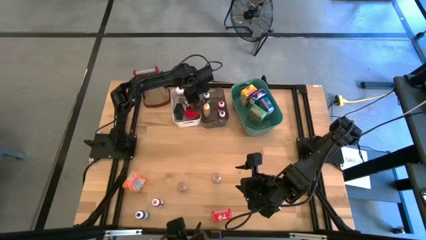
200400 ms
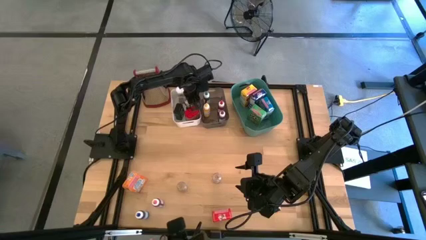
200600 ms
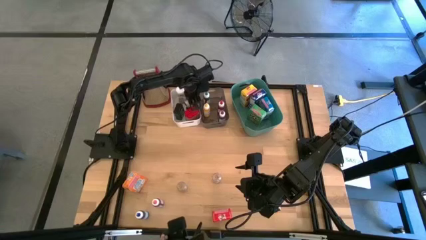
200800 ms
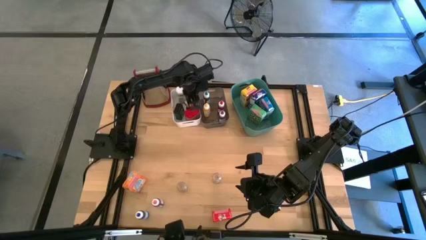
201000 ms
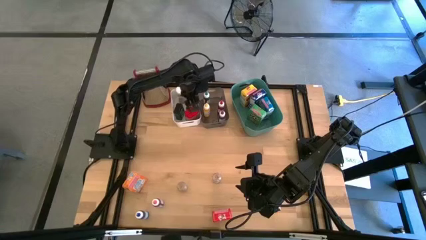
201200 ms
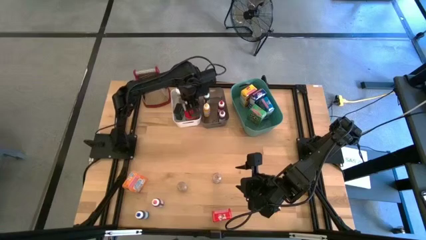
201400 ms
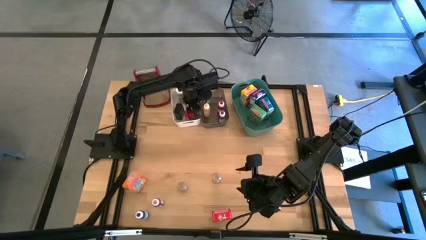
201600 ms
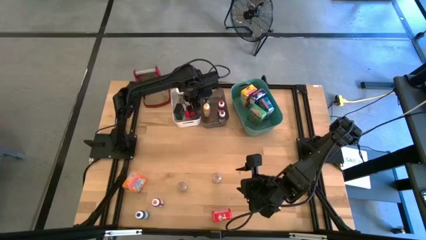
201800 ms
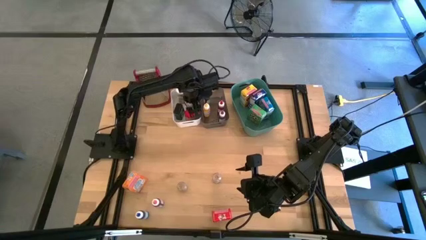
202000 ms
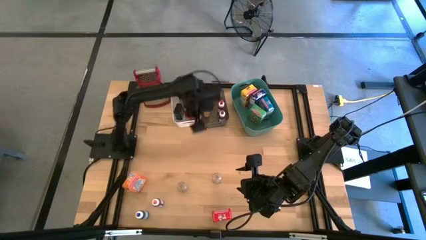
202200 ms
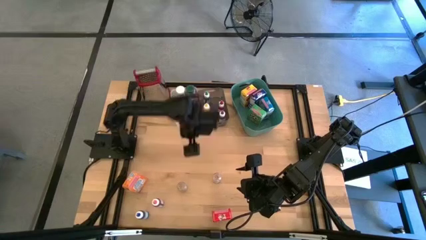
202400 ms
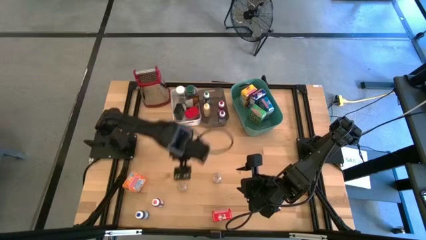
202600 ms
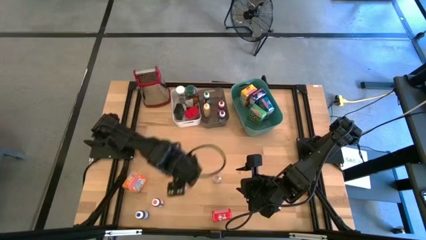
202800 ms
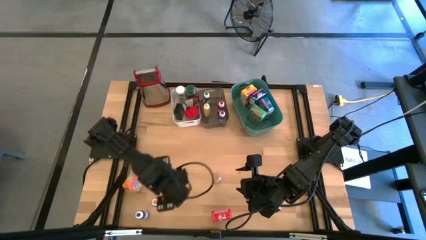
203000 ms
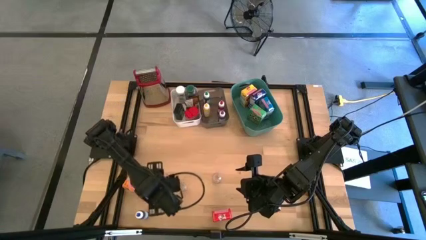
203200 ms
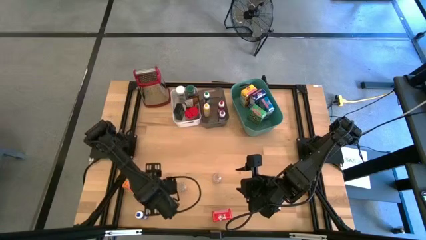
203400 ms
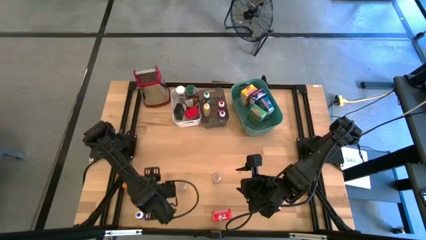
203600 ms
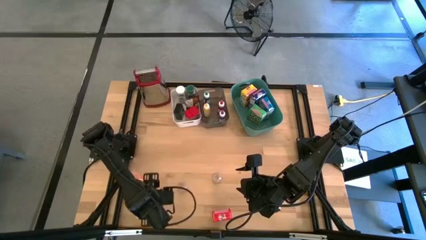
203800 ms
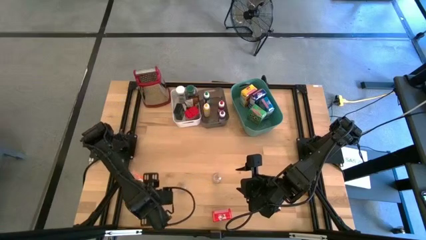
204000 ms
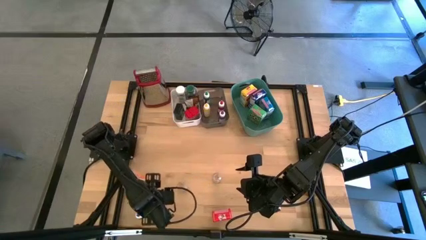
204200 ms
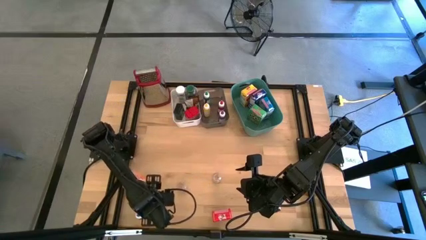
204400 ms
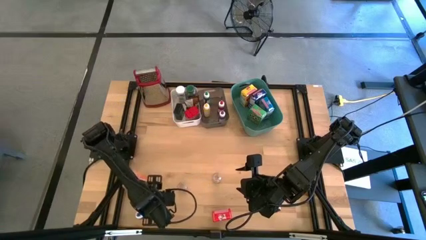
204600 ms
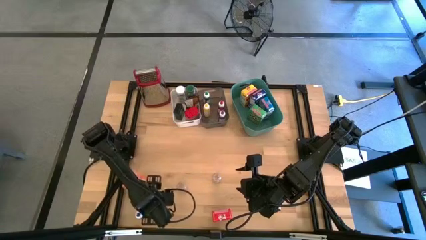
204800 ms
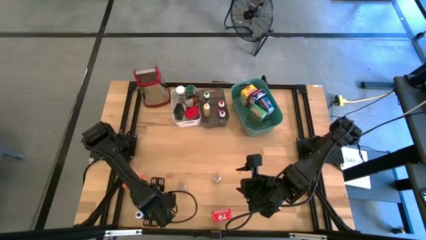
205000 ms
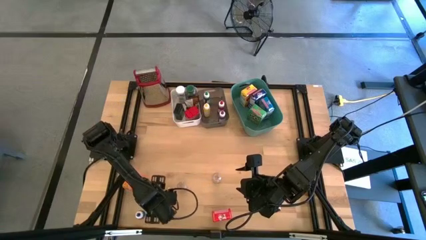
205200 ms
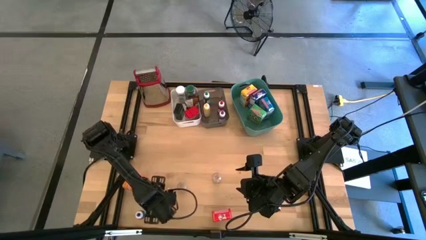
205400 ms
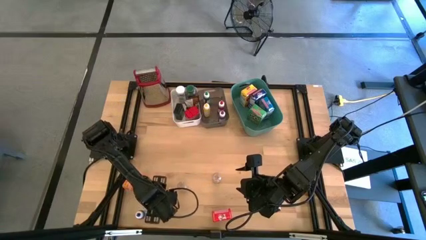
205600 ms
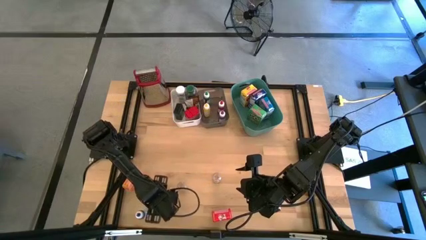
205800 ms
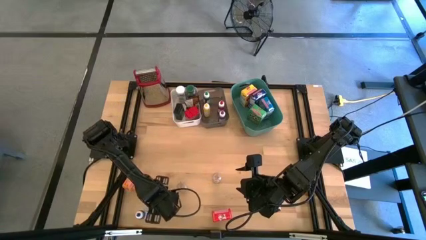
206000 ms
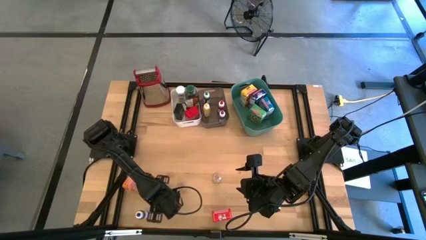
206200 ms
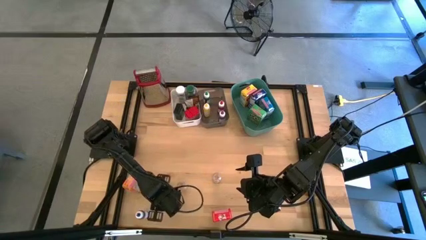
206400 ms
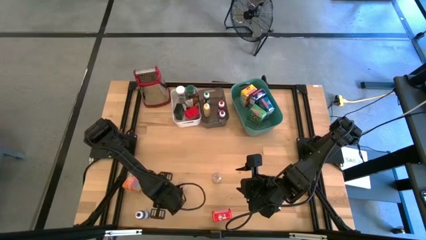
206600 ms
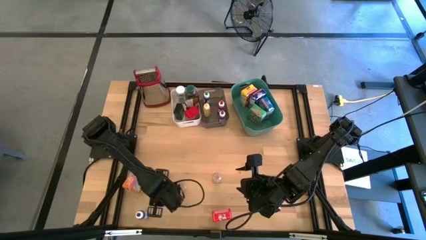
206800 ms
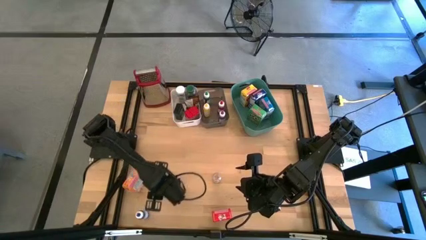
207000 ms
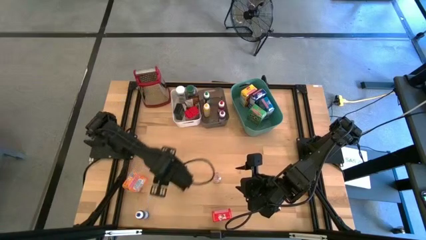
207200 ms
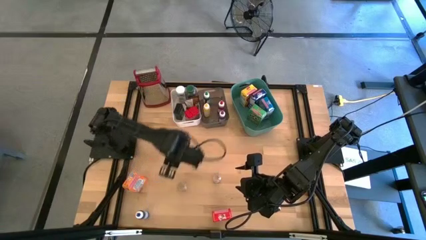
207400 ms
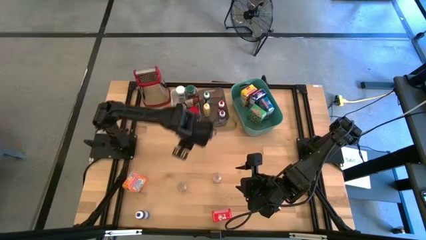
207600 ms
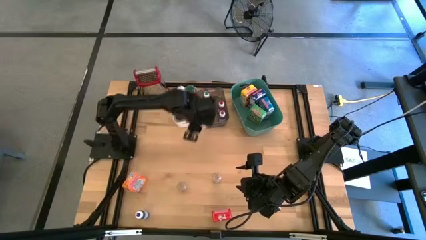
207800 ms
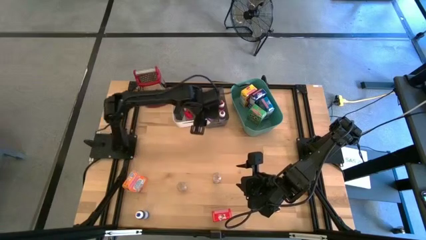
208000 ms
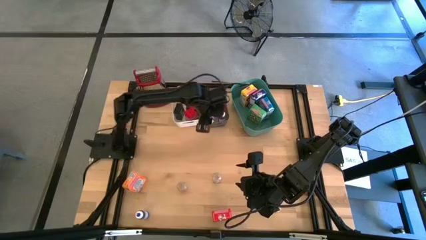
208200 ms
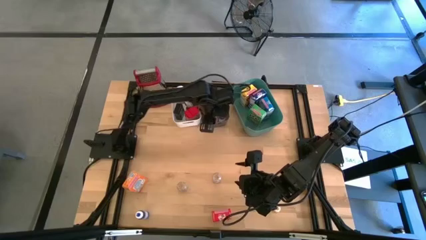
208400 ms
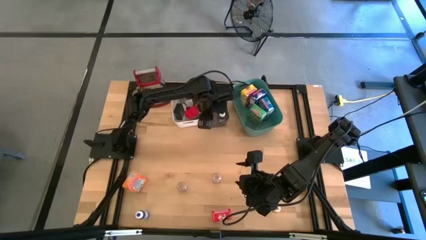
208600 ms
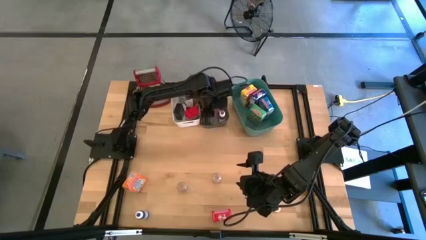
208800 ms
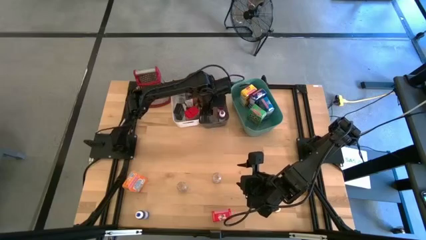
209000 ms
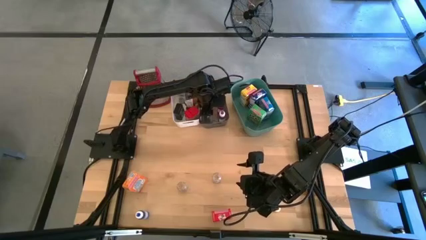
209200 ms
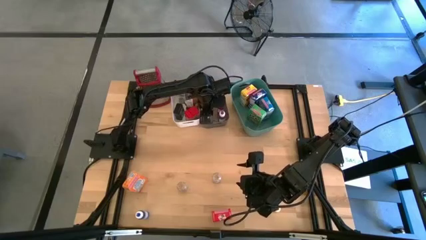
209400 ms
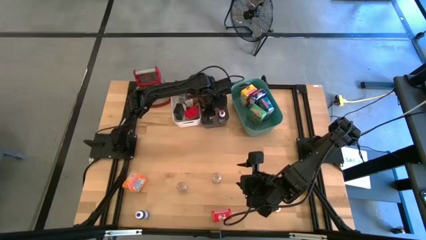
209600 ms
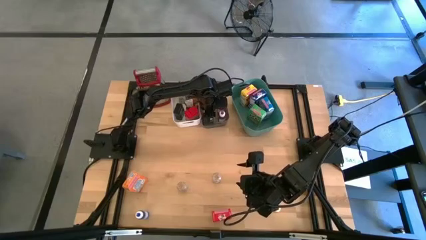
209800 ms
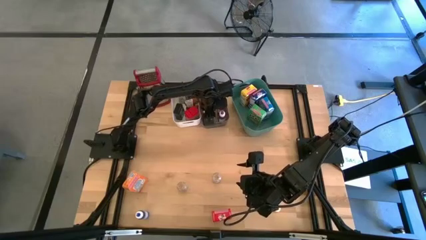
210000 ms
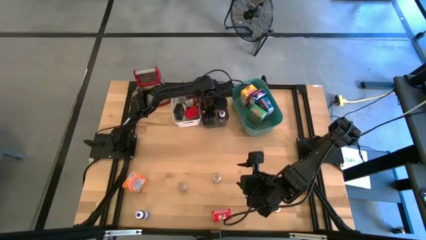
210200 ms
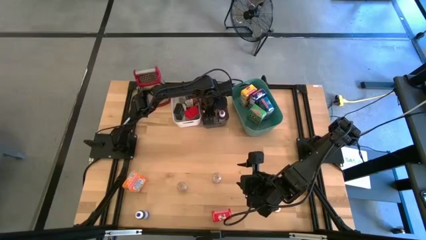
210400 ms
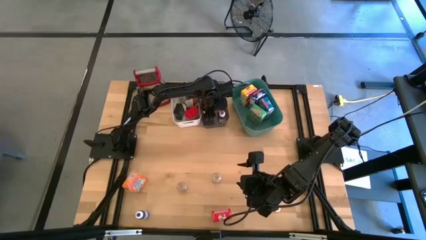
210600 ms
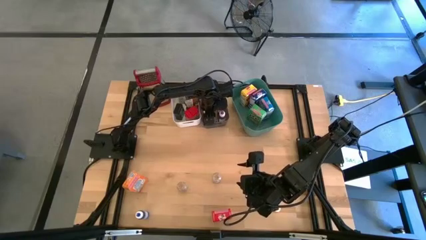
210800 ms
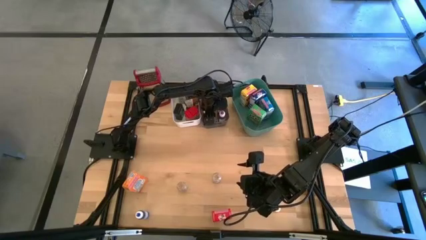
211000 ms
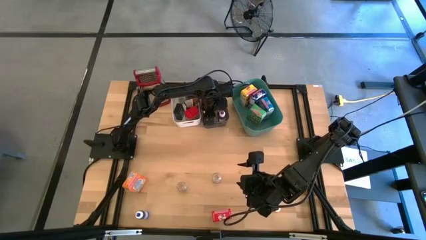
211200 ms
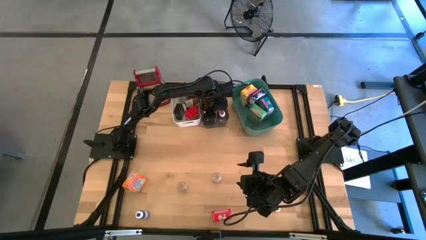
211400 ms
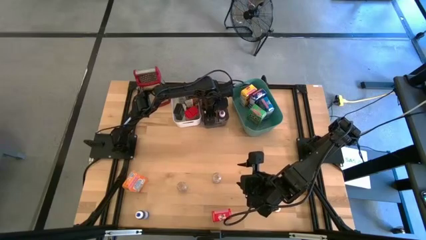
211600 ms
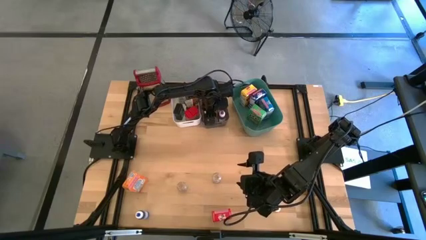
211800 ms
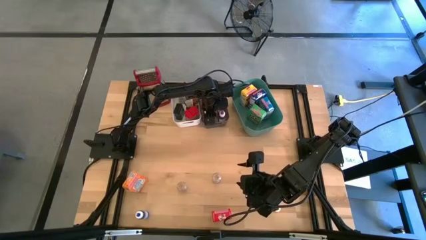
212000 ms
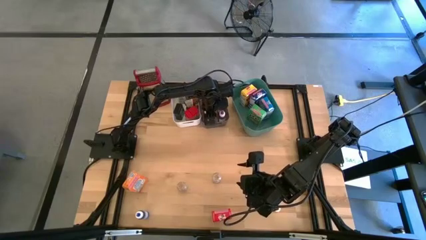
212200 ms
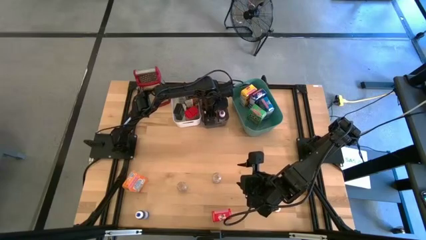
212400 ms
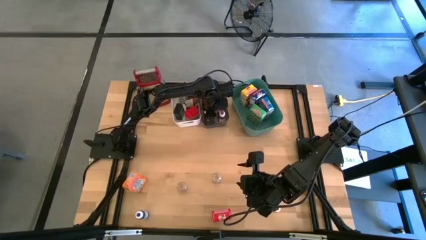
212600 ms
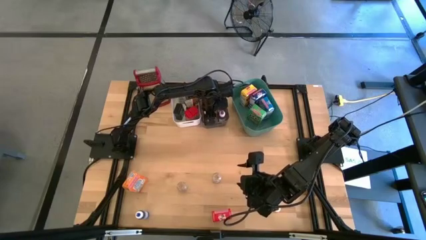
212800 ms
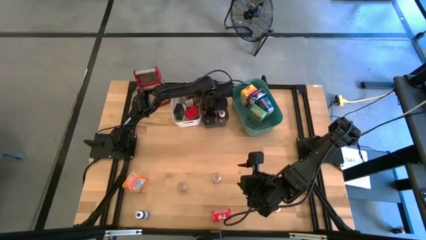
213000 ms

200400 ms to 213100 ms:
Task: Pick & Place Kitchen Items
Put the pink food coloring bottle into the middle black transparent bin

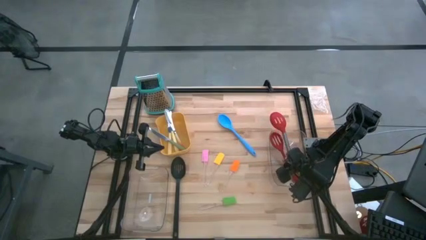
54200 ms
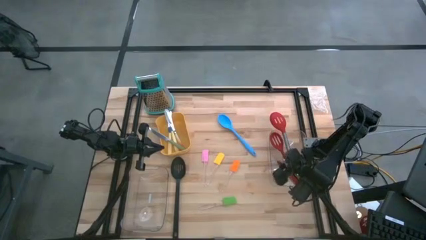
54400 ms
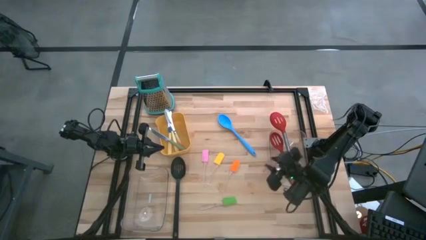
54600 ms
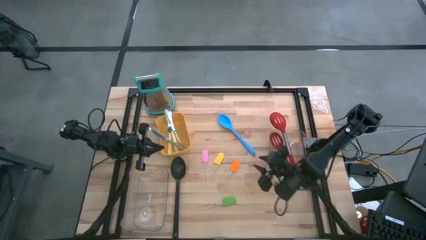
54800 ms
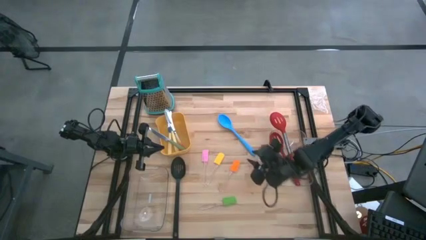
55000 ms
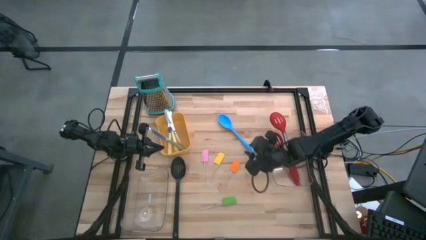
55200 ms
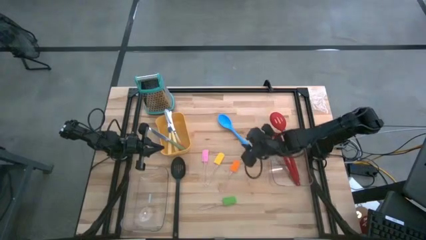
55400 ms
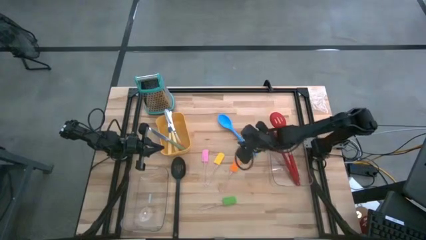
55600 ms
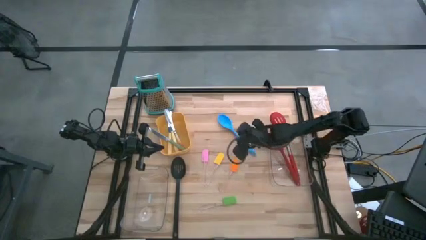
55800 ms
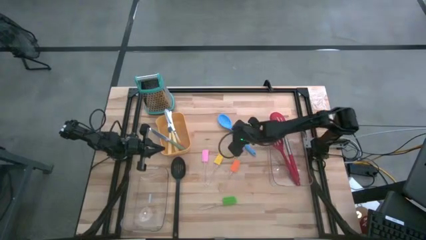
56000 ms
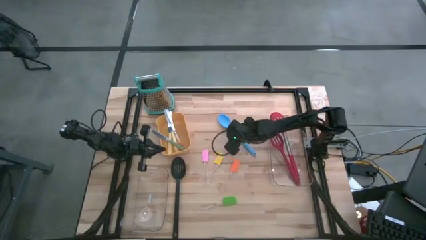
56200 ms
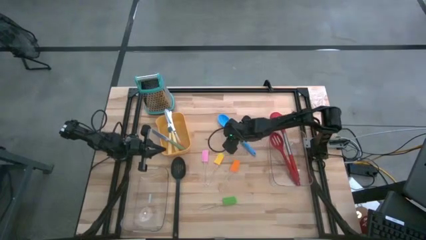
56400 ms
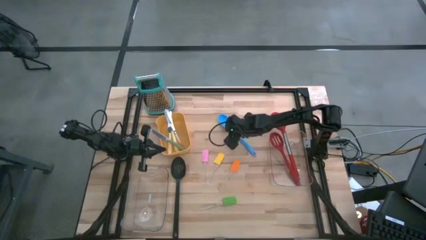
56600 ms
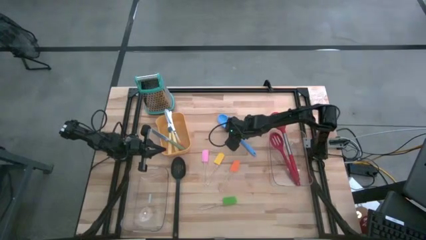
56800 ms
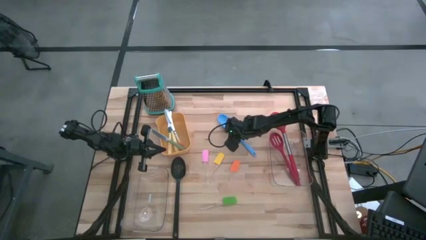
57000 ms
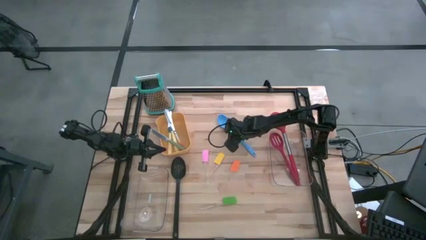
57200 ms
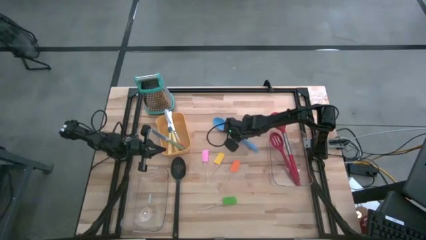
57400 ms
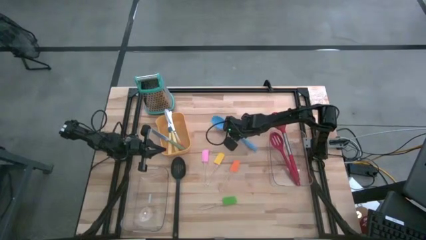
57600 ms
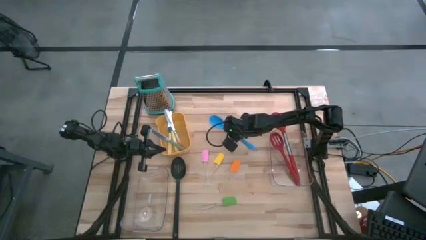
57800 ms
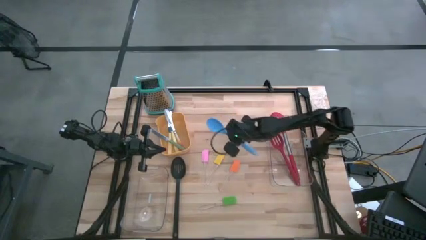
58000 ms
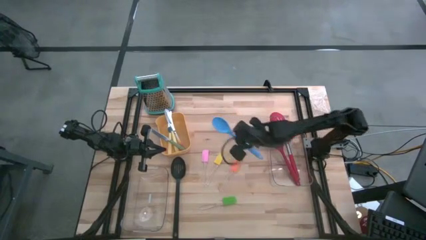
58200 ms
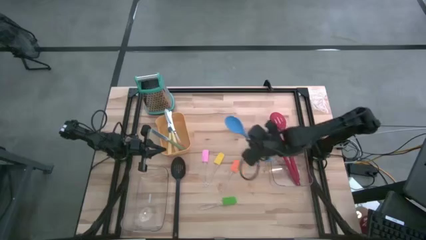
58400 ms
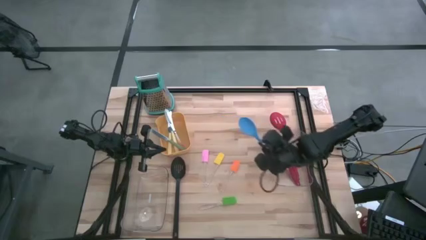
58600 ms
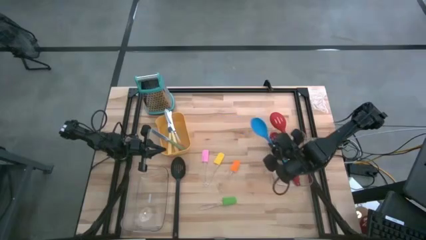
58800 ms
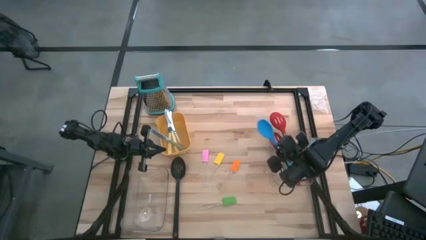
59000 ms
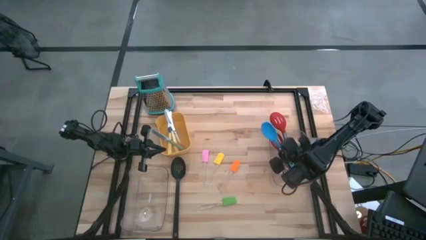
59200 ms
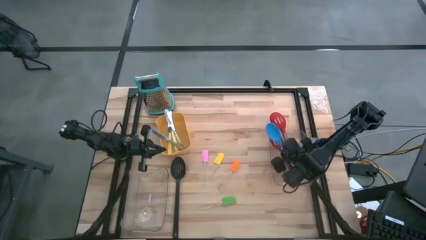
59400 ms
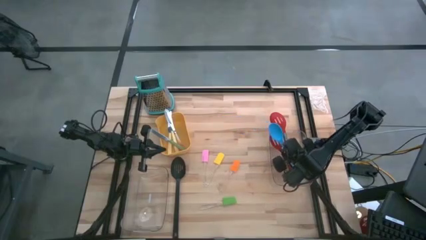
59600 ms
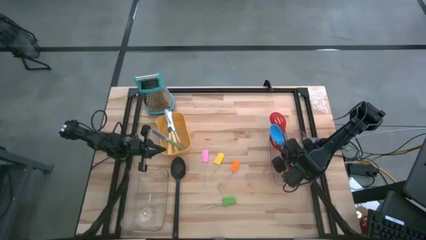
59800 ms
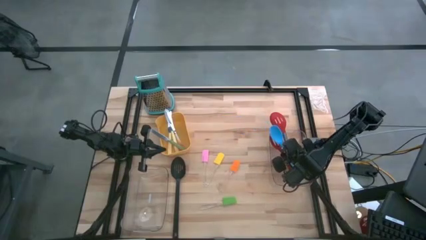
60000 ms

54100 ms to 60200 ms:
Task: Pick & Place Kitchen Items
Put the blue serving spoon into the right transparent bin
